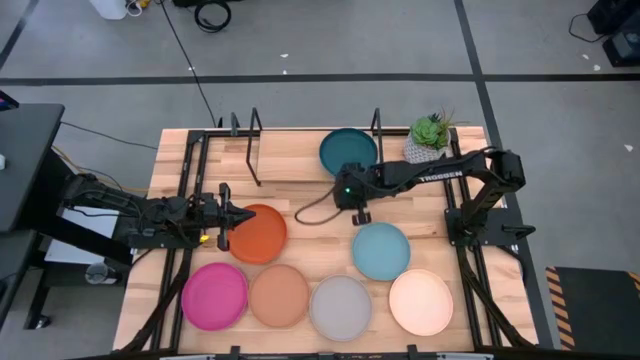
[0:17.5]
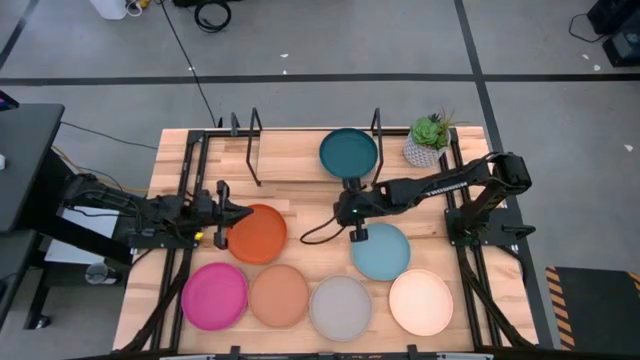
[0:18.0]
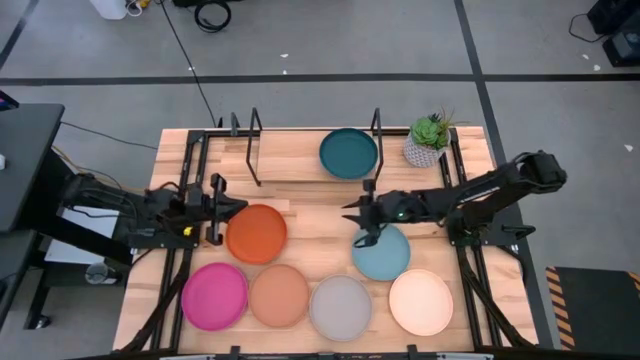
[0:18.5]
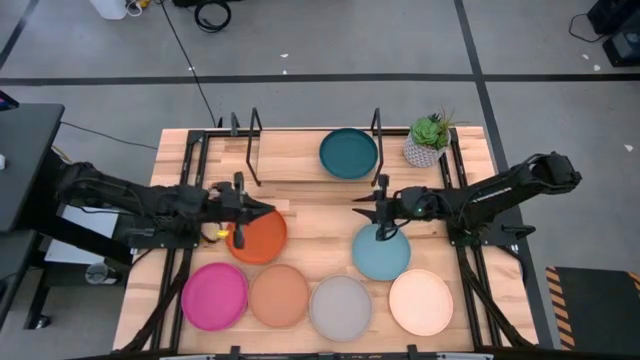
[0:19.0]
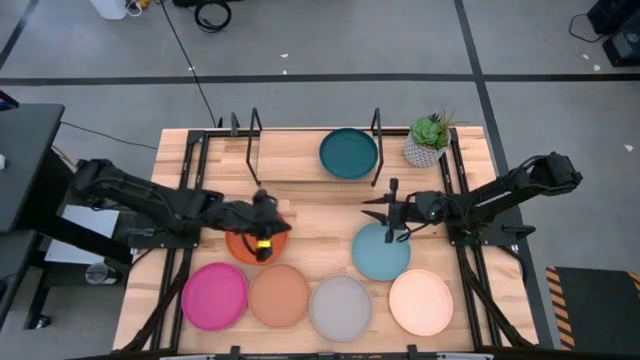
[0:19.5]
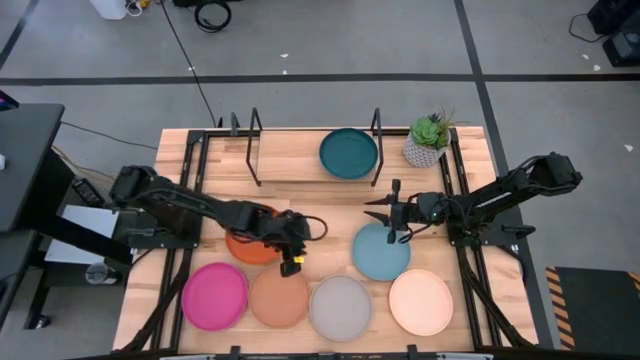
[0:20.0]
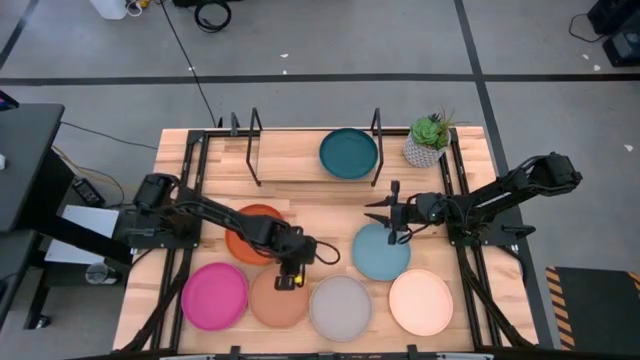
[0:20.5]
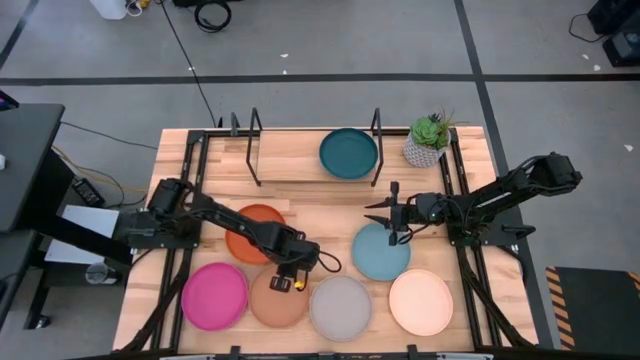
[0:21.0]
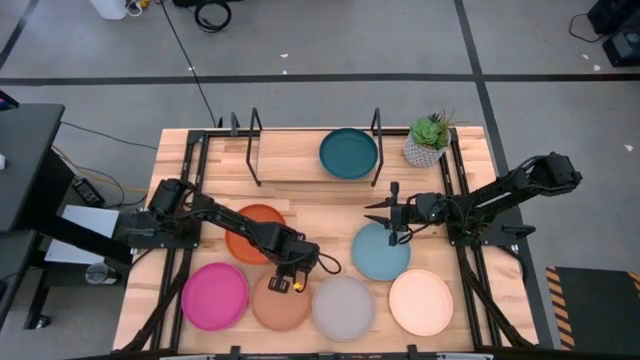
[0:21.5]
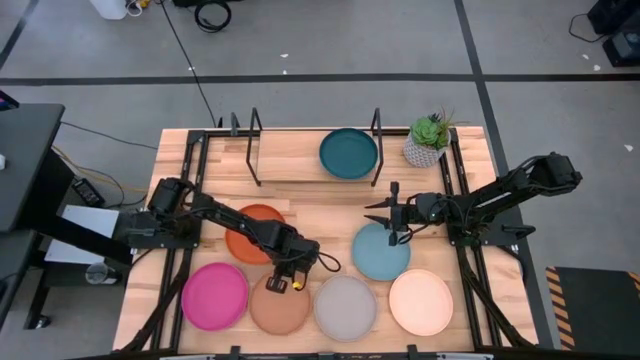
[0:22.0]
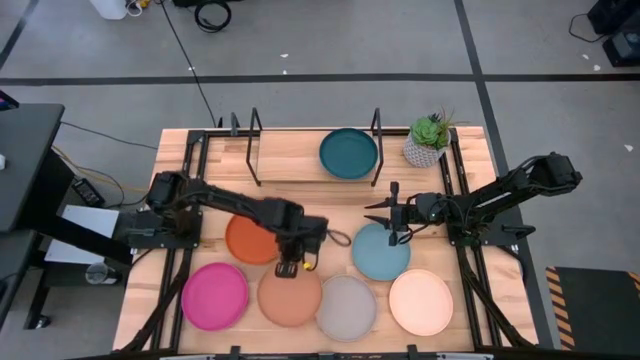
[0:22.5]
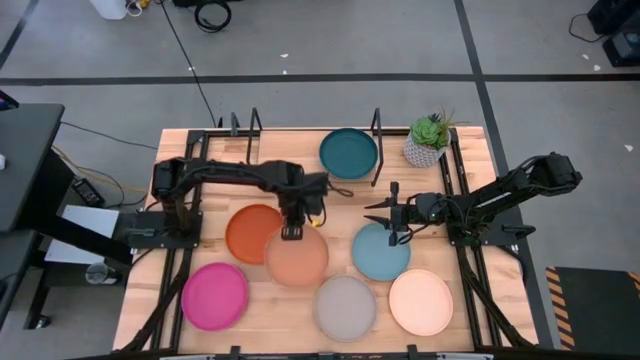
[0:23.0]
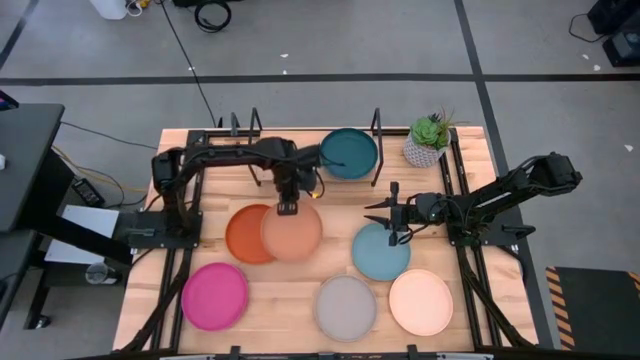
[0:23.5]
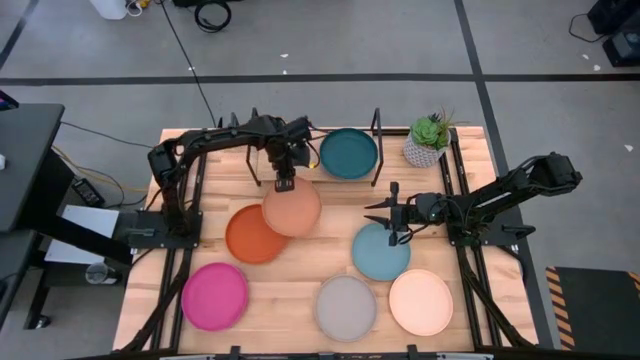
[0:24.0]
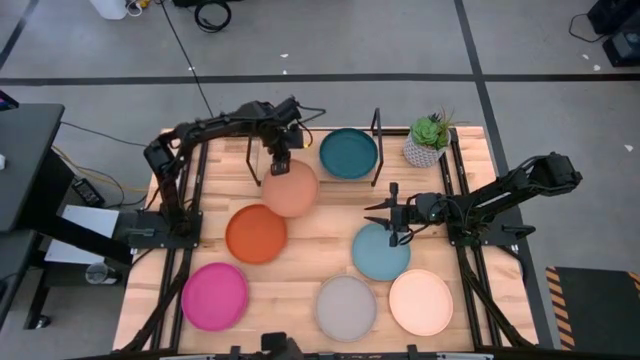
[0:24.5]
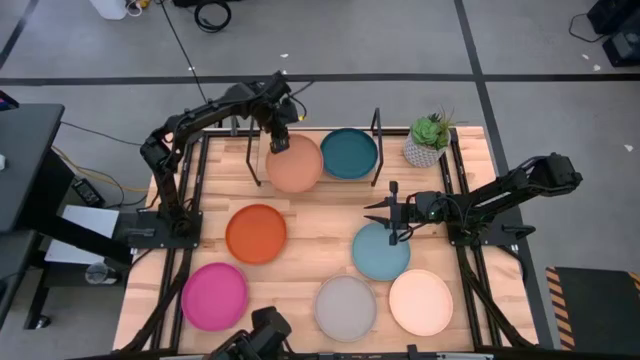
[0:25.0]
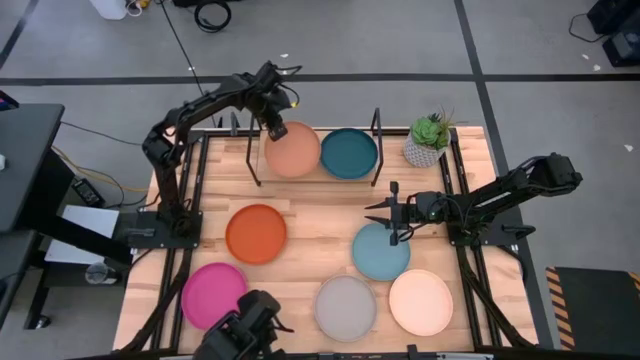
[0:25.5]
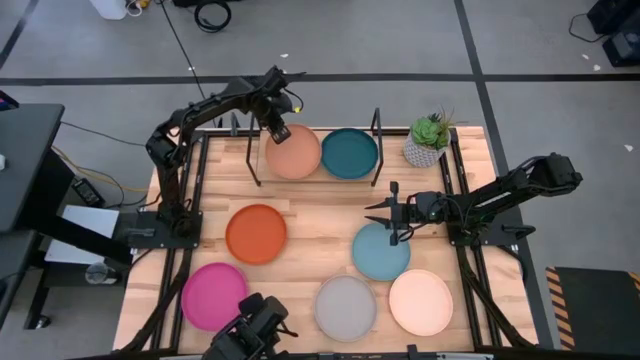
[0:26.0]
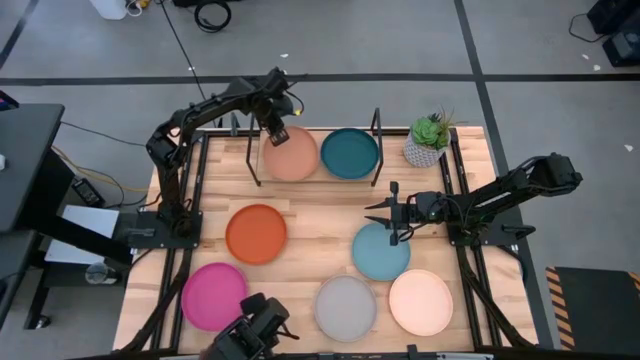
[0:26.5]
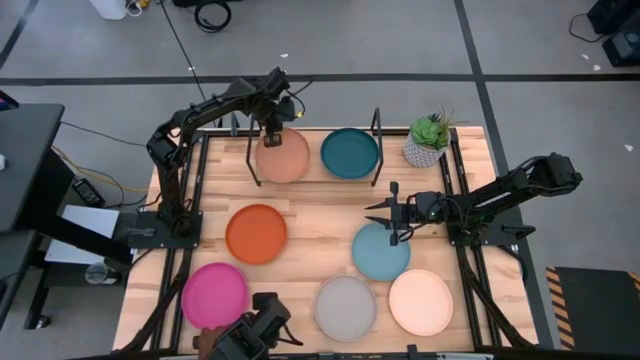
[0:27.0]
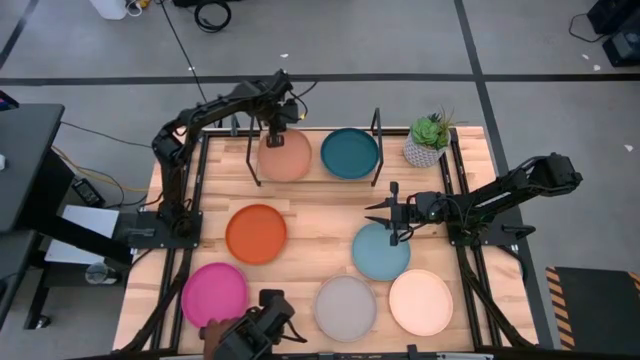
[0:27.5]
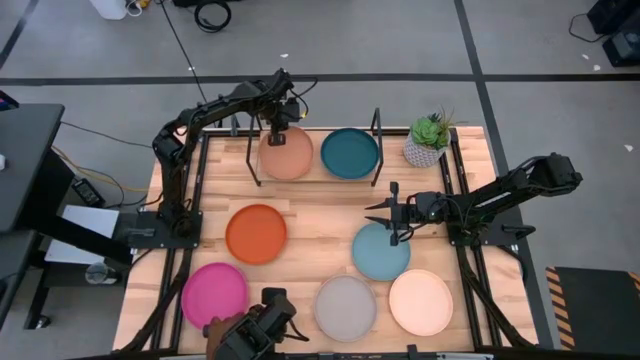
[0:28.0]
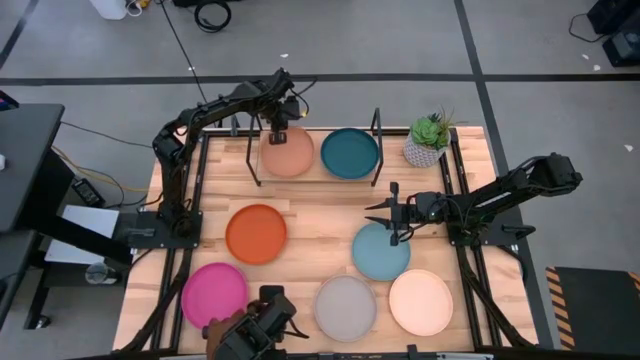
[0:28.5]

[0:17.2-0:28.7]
Task: Place and stack plates onto a shelf
Put the light orange plate on the shelf

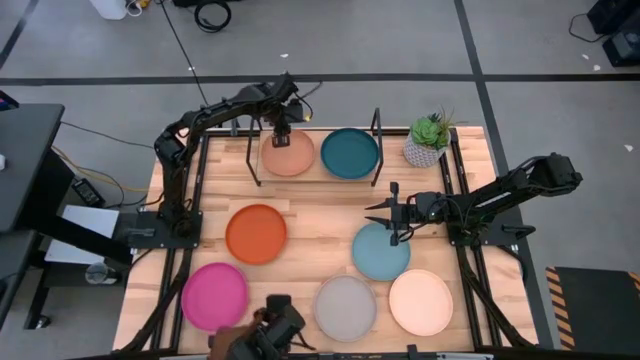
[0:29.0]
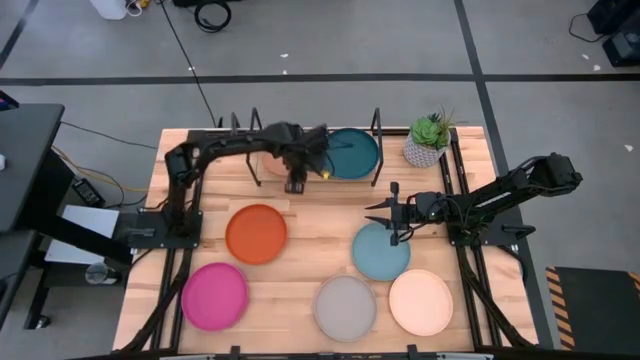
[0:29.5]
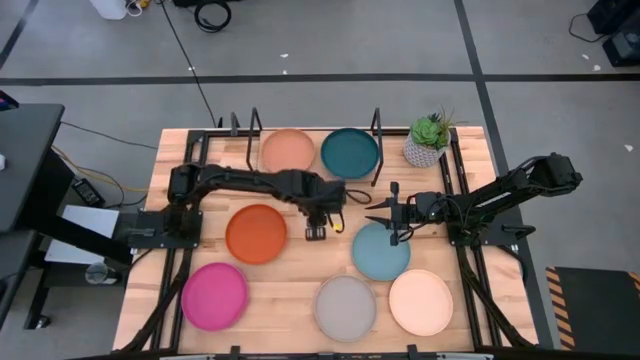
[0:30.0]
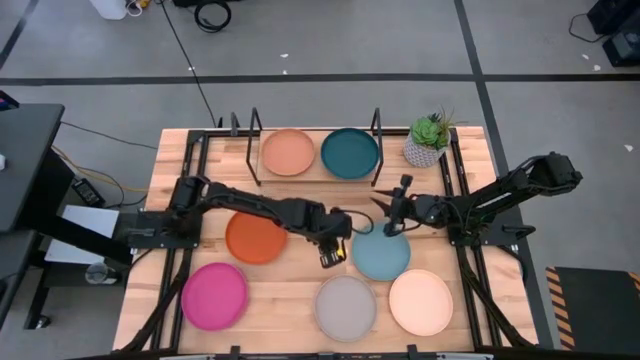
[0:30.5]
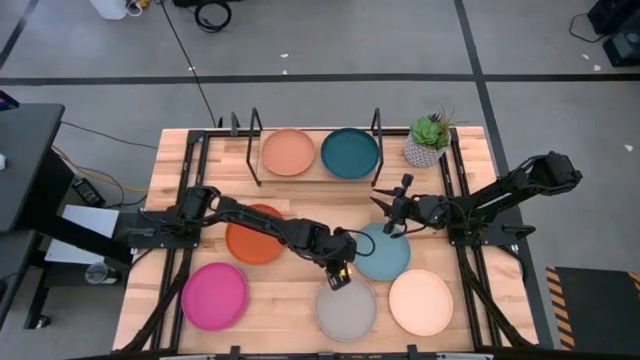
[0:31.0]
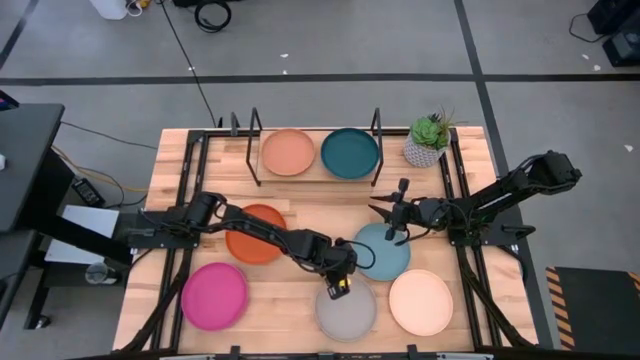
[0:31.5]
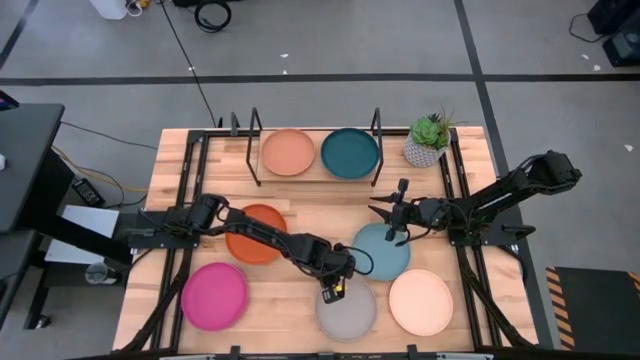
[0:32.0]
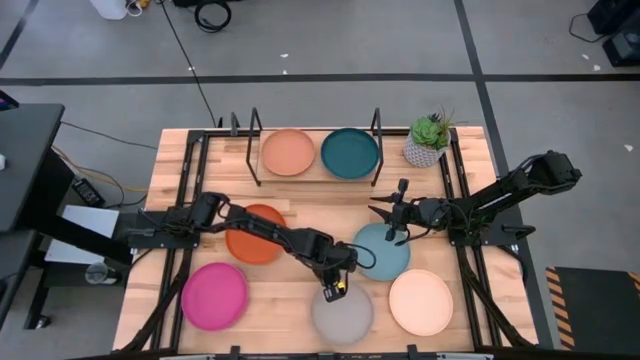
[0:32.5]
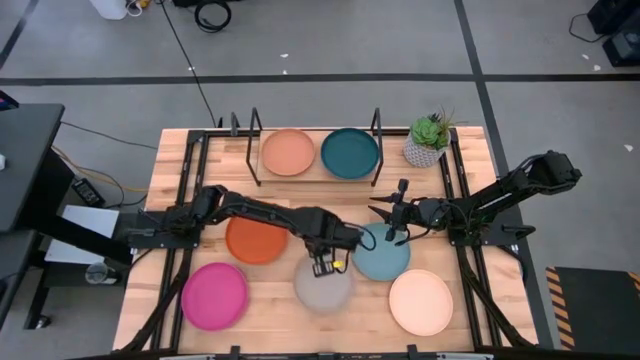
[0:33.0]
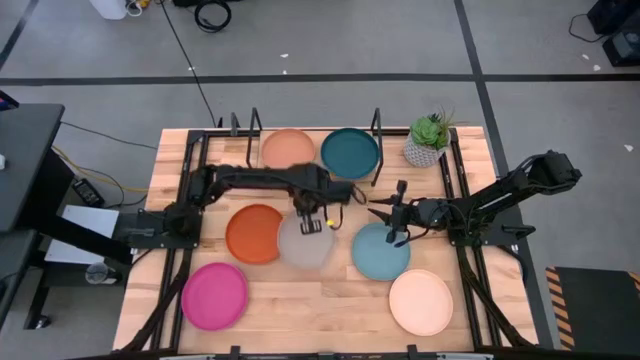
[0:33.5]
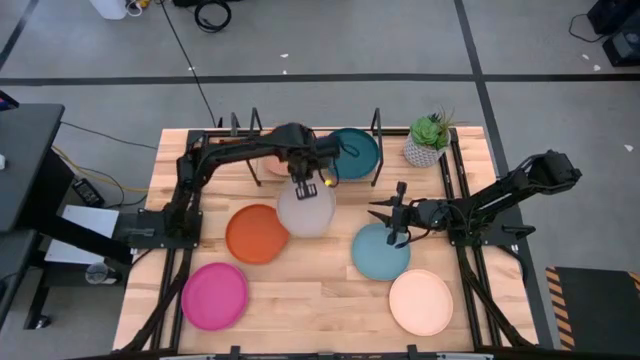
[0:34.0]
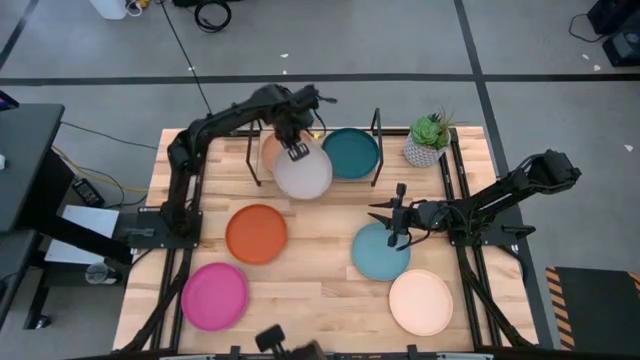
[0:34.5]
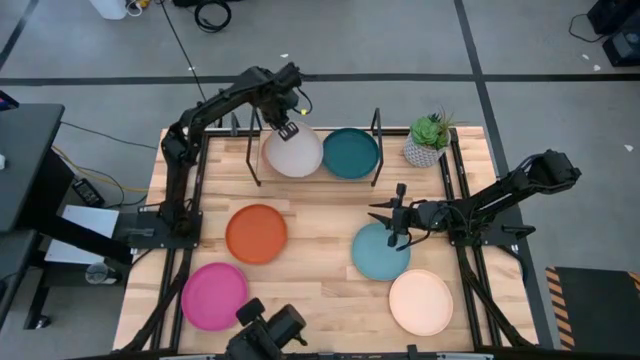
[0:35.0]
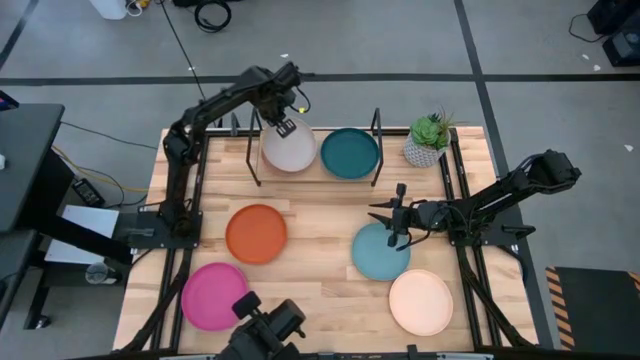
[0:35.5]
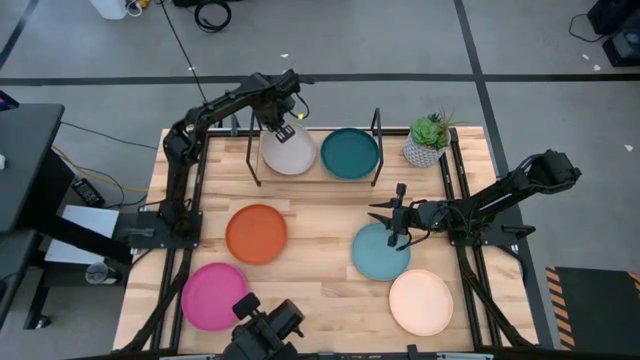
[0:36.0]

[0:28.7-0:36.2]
Stack the gray plate on top of the light orange plate on the shelf

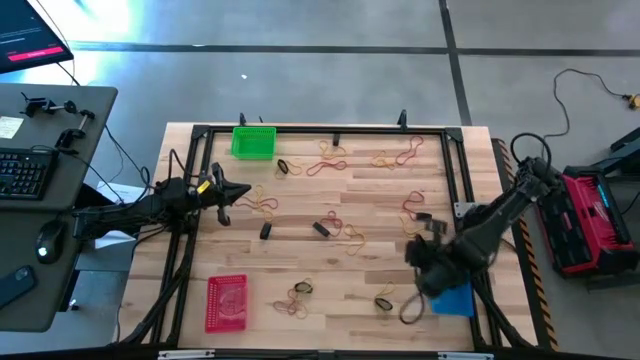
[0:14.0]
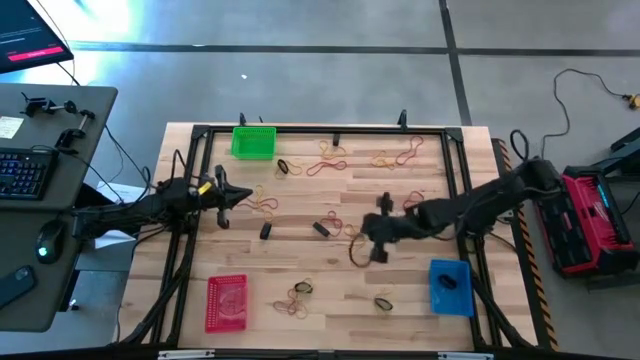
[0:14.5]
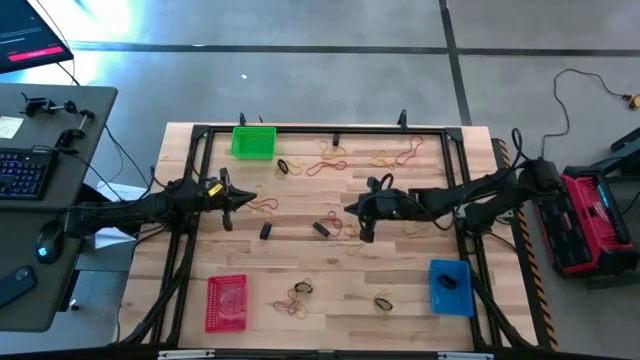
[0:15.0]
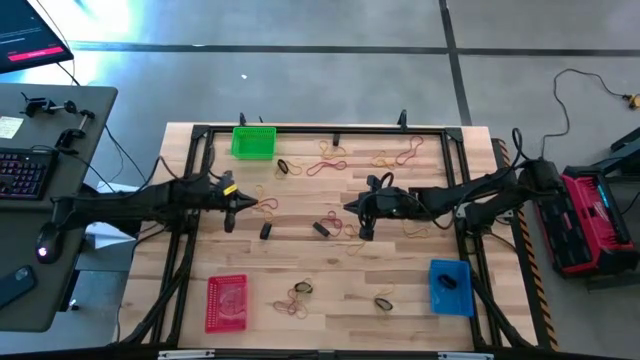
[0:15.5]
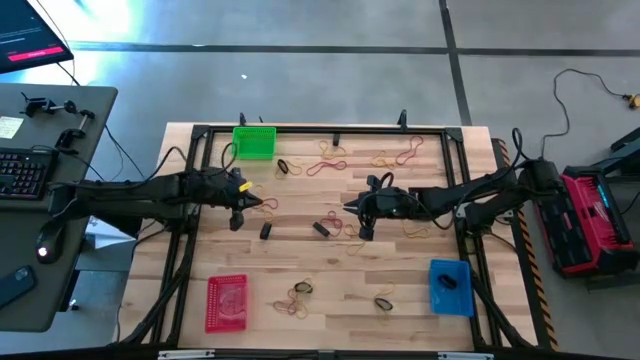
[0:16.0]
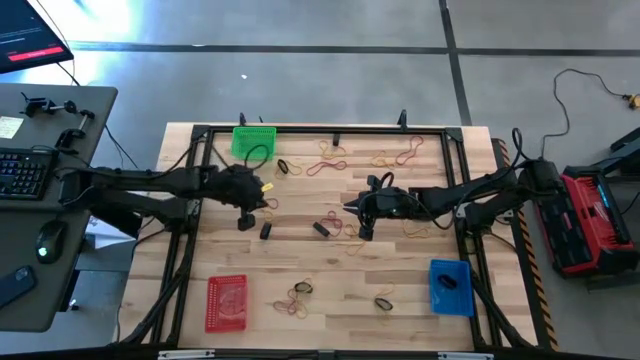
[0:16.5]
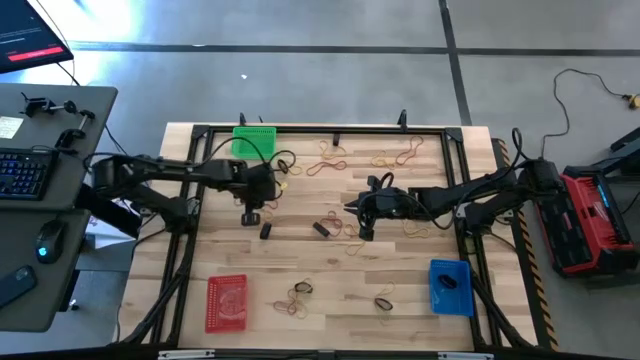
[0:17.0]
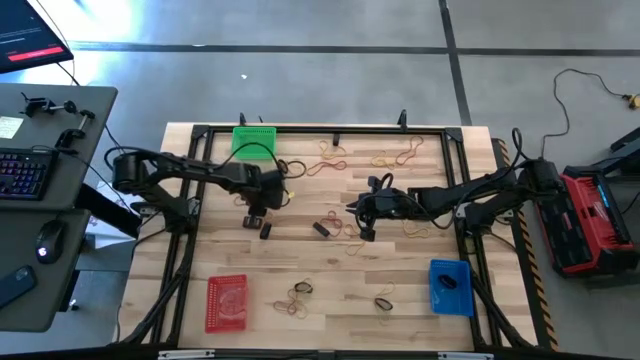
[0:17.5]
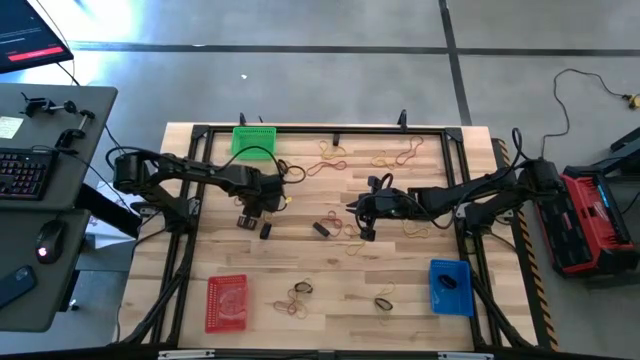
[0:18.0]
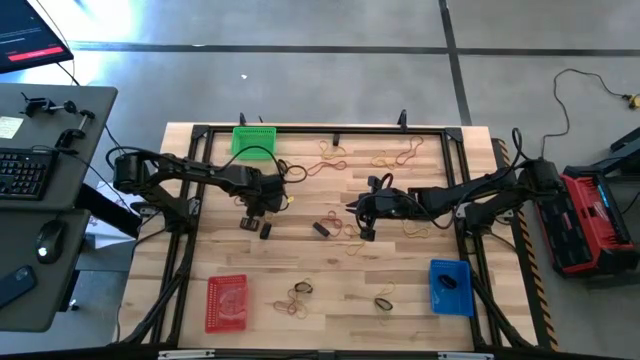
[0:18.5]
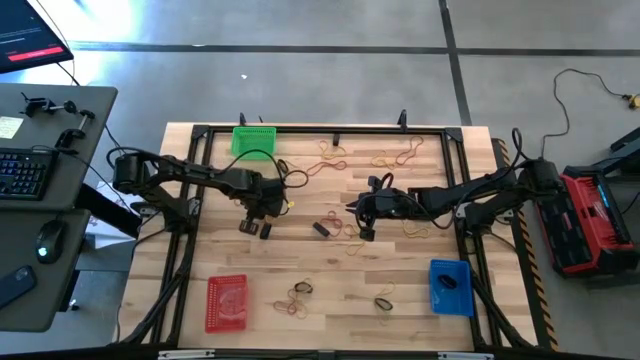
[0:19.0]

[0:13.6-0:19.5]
Task: Sort rubber bands into baskets
Put the yellow rubber band into the red bin
